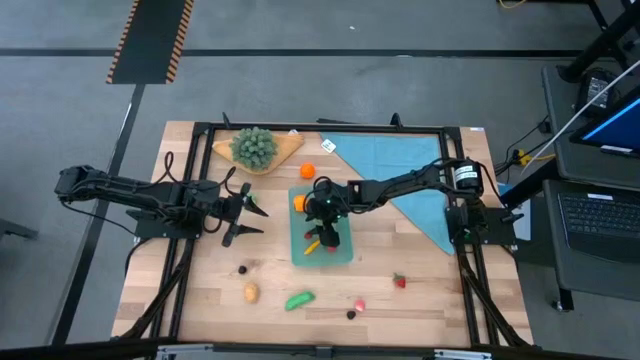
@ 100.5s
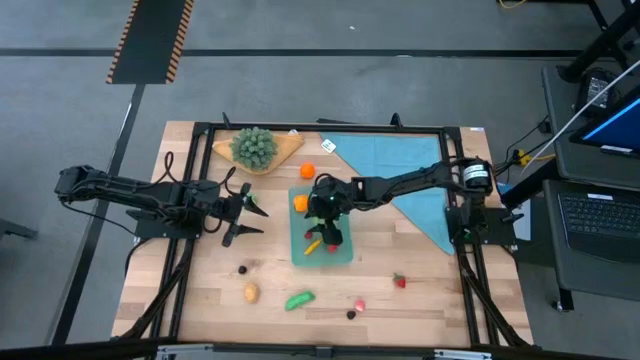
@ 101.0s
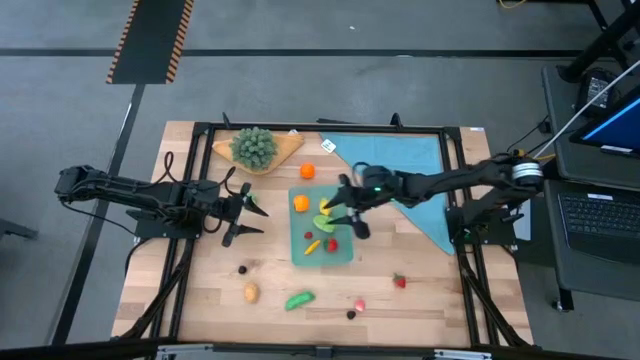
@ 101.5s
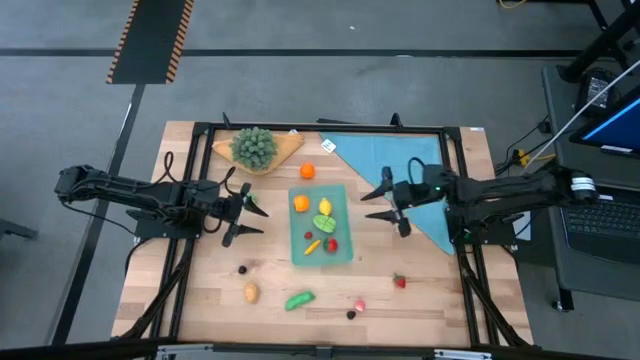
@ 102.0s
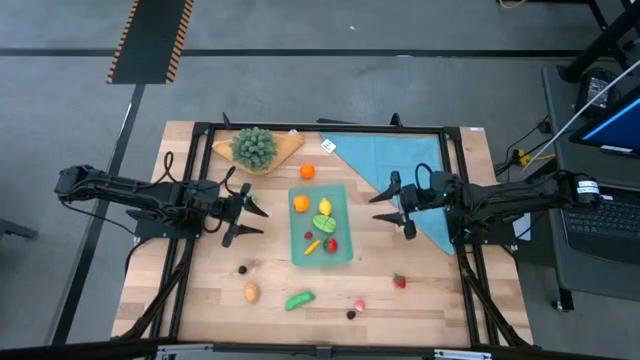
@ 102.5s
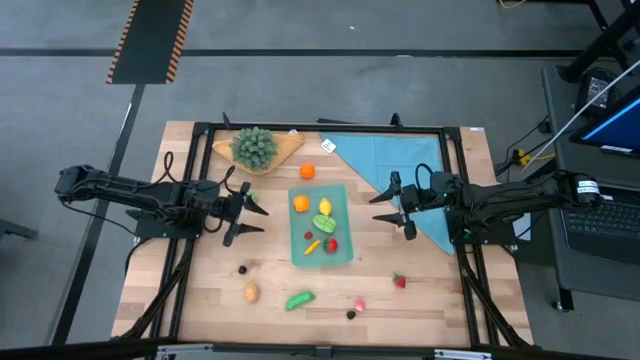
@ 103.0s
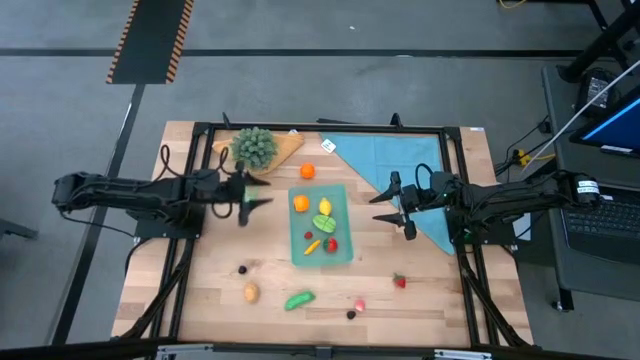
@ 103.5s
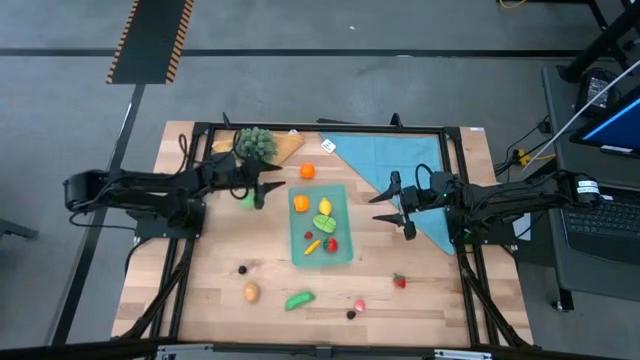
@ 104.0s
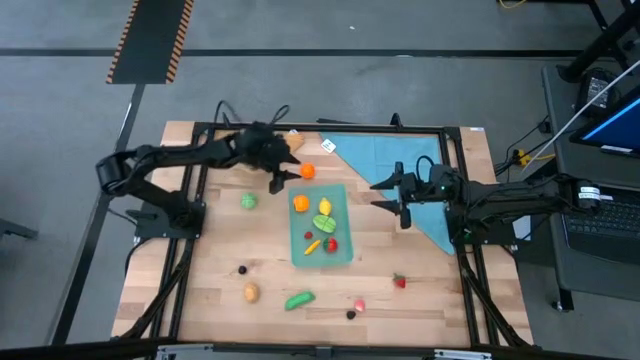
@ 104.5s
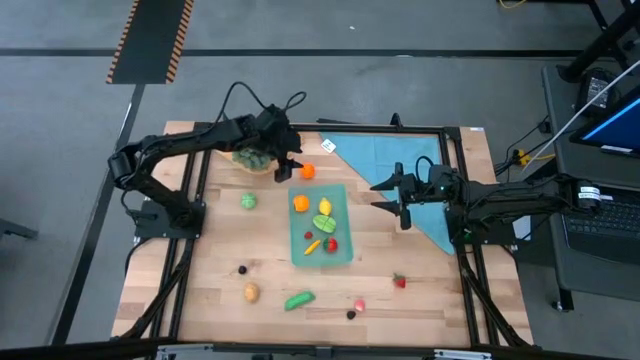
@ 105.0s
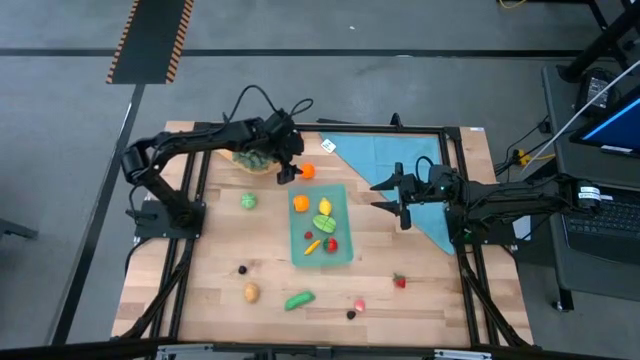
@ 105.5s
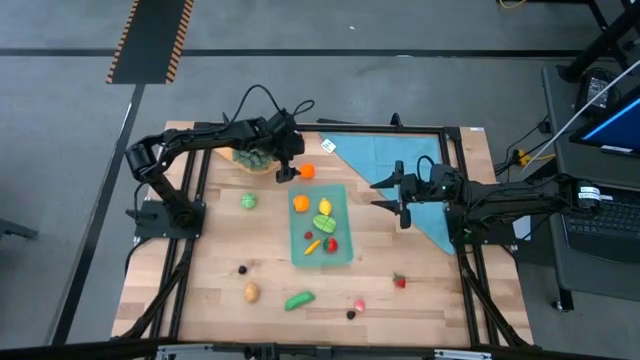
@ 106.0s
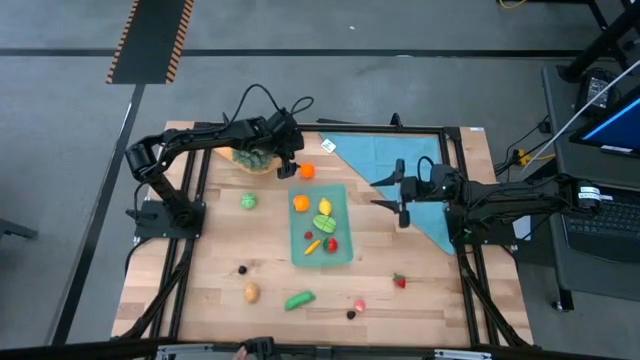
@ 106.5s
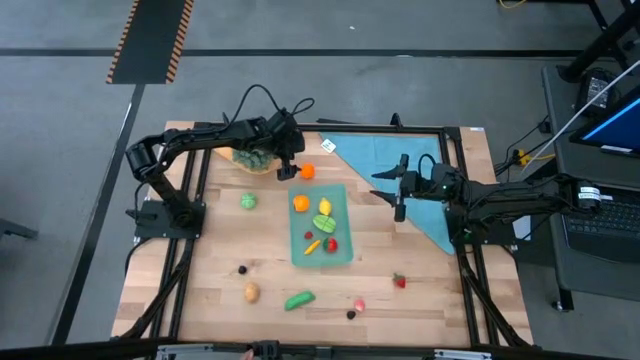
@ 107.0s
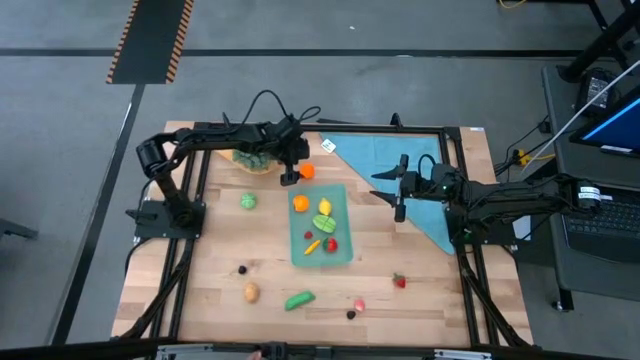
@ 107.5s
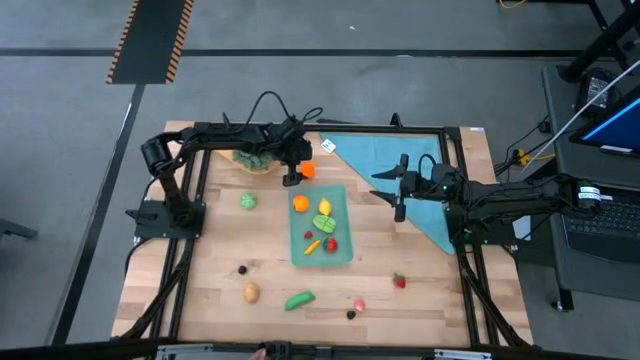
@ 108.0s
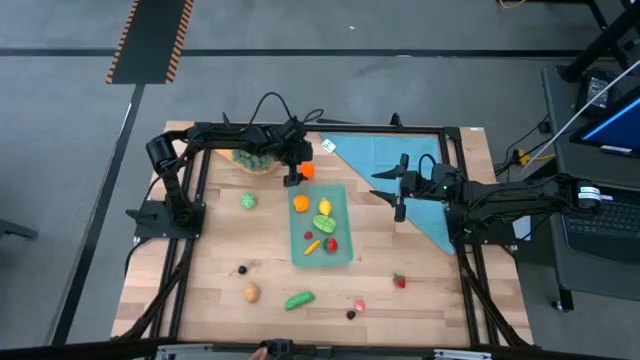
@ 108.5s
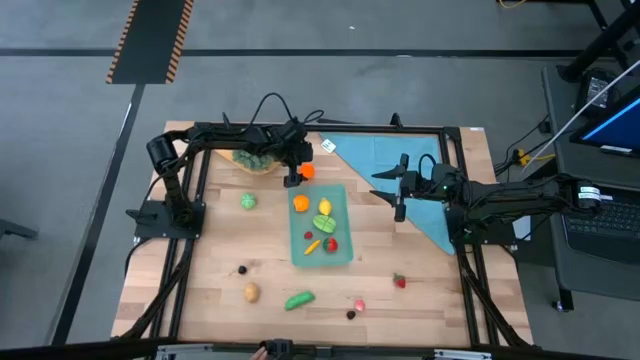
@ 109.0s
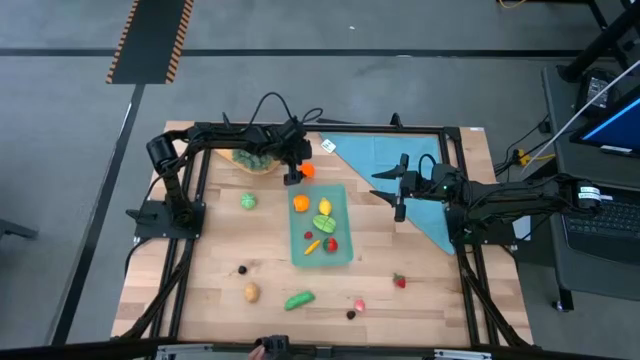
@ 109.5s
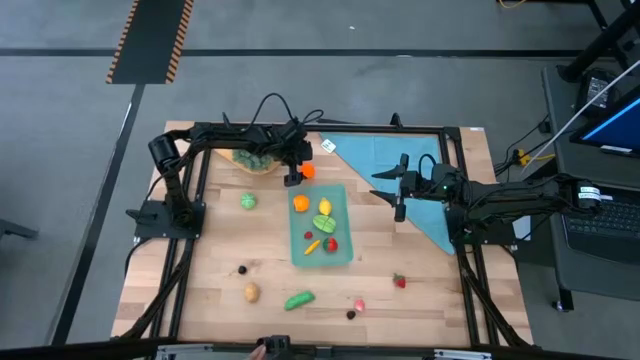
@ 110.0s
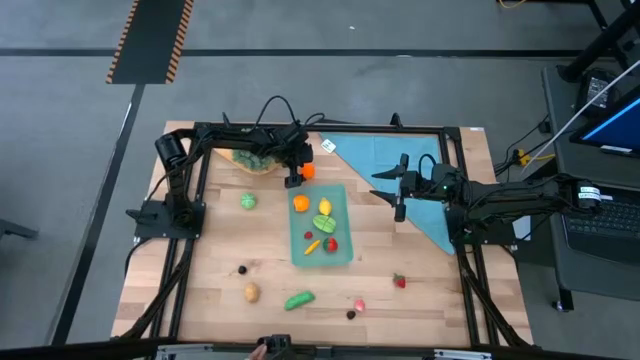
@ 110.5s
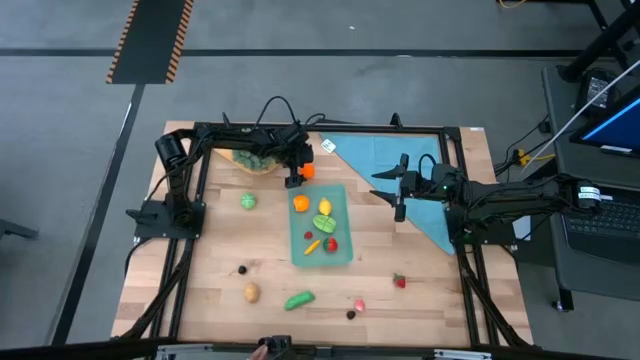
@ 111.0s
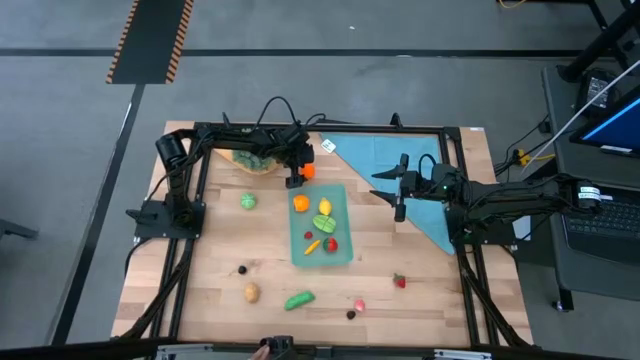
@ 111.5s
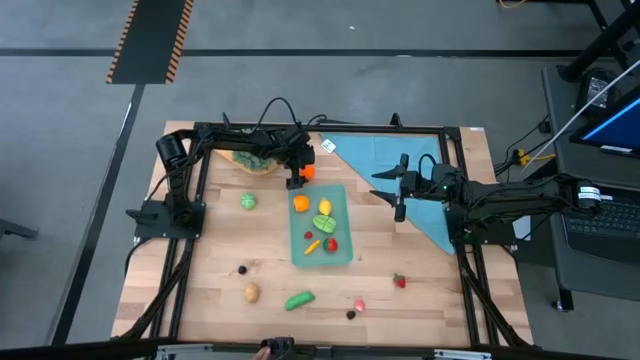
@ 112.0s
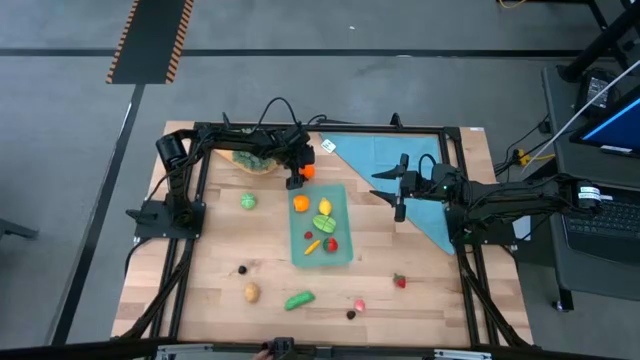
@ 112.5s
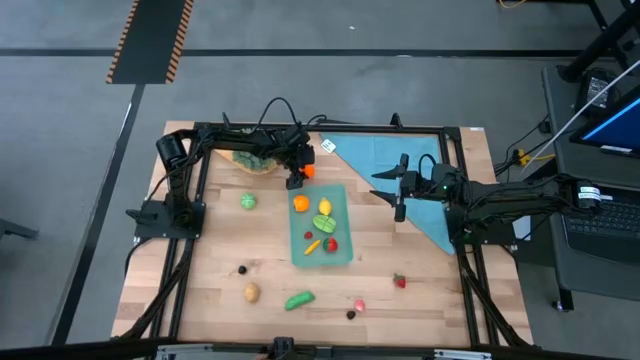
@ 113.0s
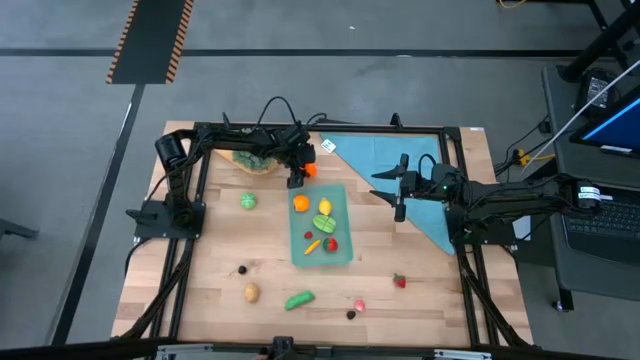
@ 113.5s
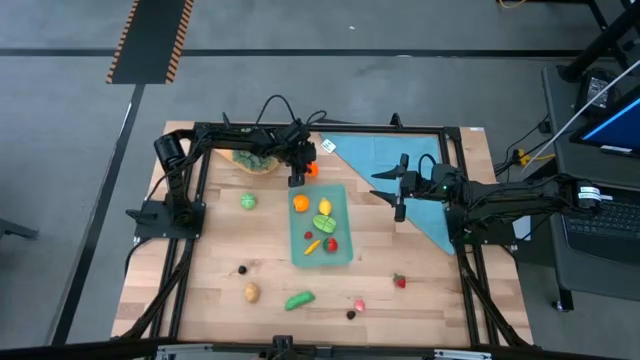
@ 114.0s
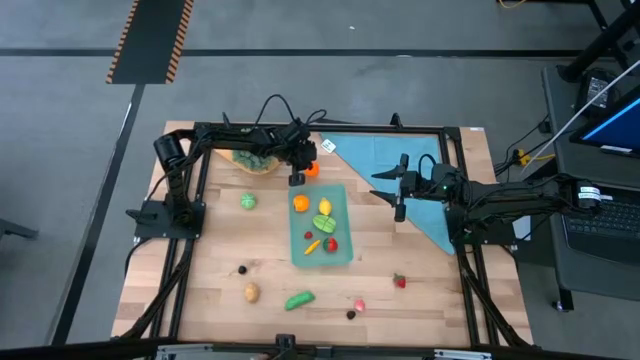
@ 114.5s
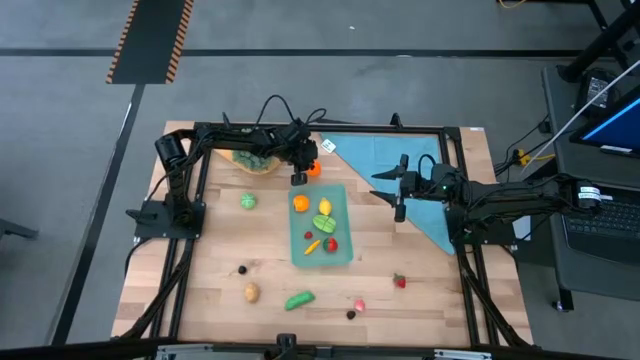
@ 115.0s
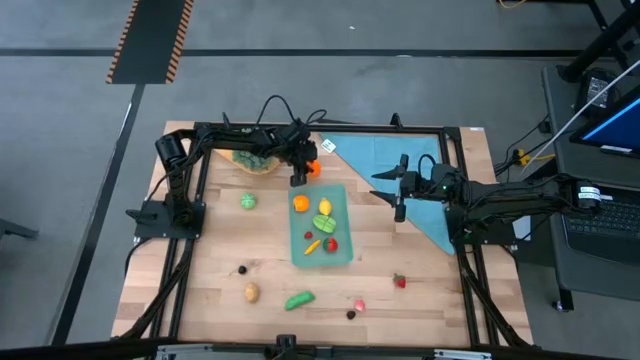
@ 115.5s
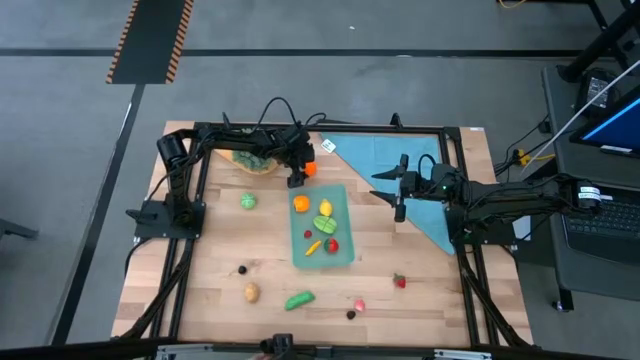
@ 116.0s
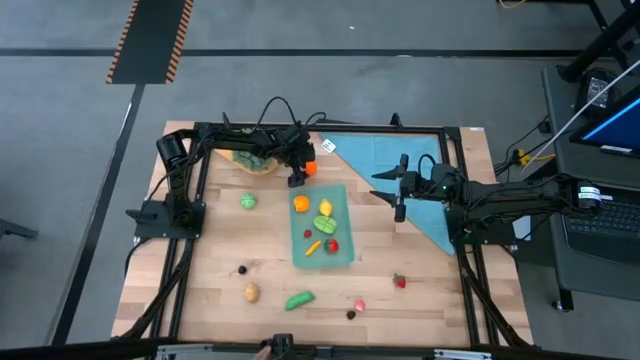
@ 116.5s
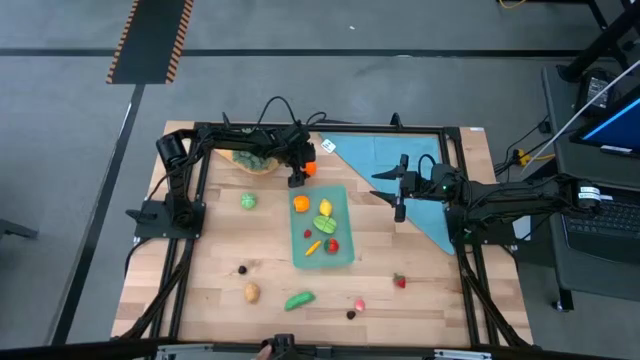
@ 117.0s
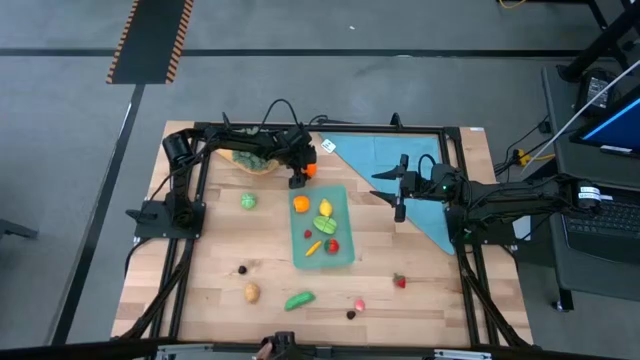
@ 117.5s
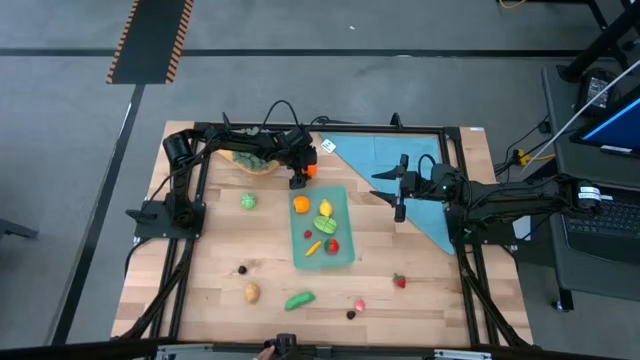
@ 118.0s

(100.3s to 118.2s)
Task: Pick and placing Produce into tupperware
Put the squash into the bin

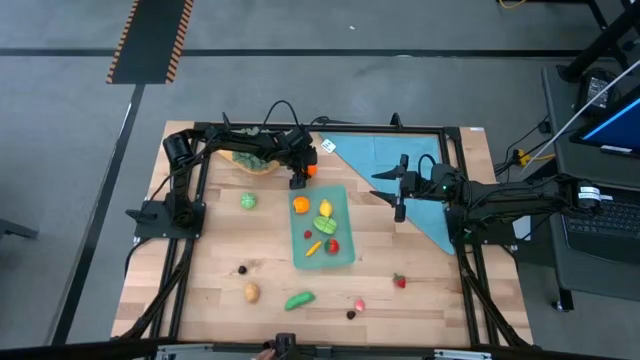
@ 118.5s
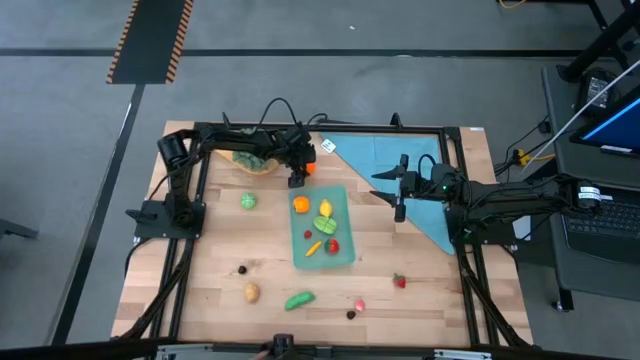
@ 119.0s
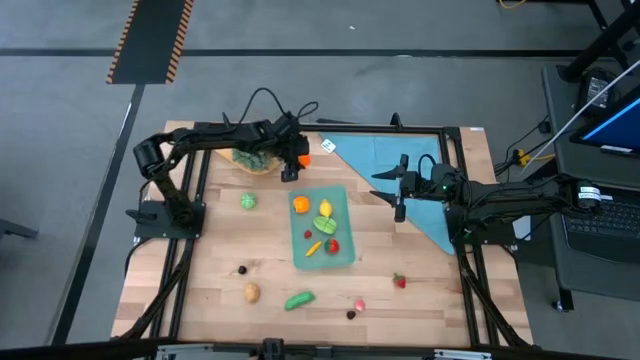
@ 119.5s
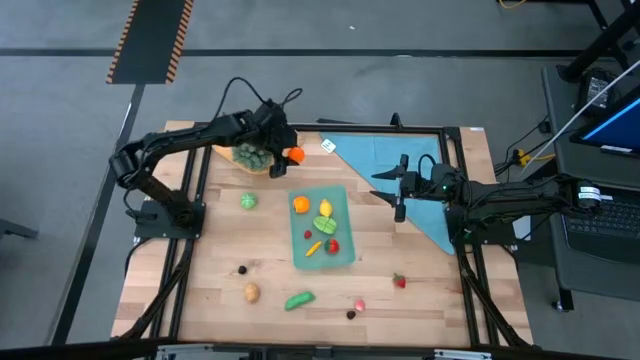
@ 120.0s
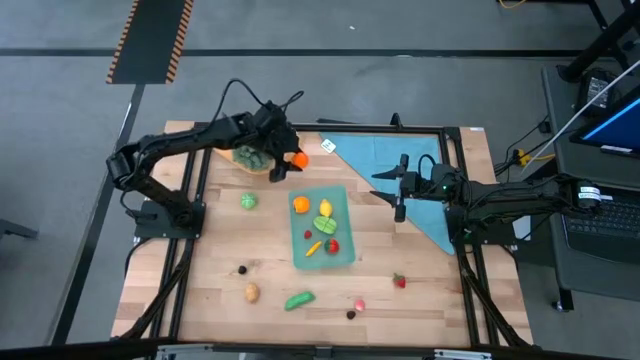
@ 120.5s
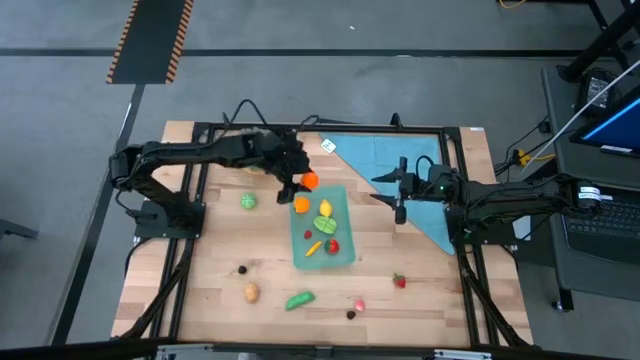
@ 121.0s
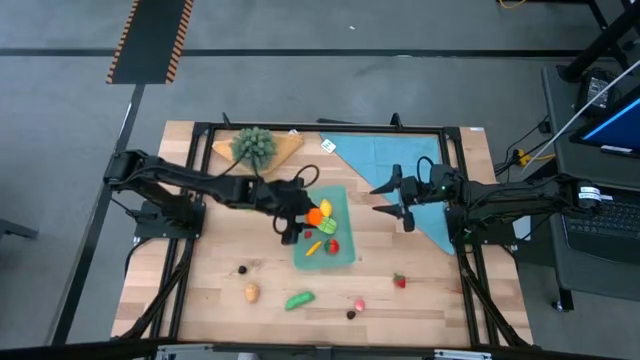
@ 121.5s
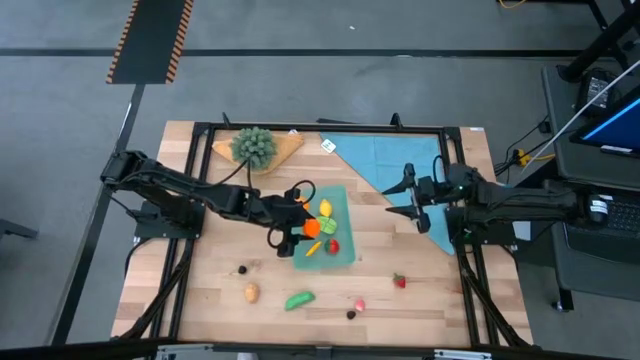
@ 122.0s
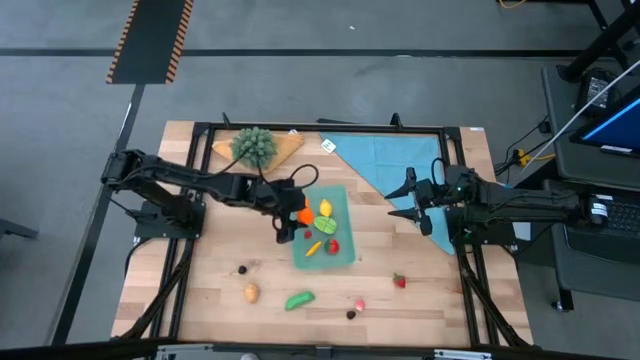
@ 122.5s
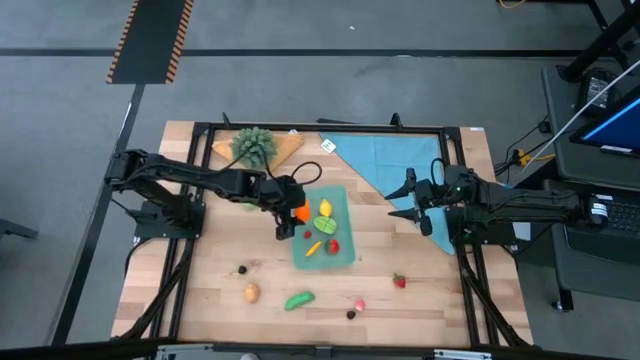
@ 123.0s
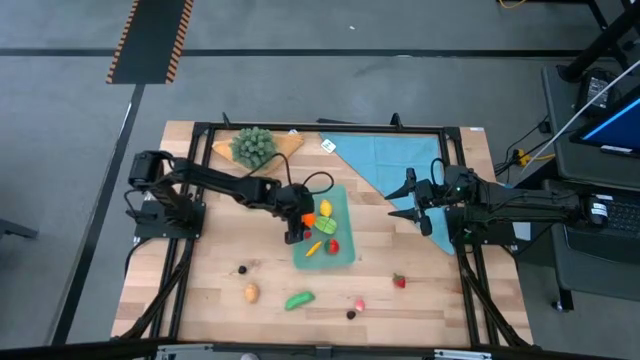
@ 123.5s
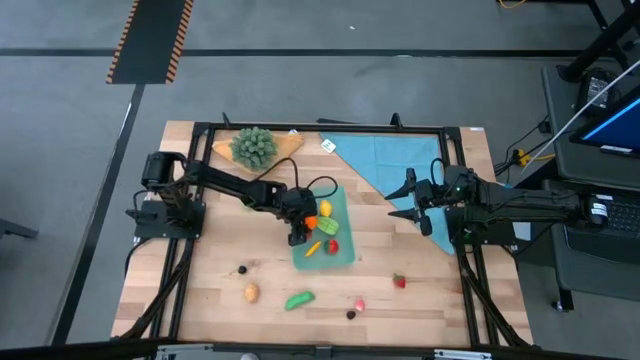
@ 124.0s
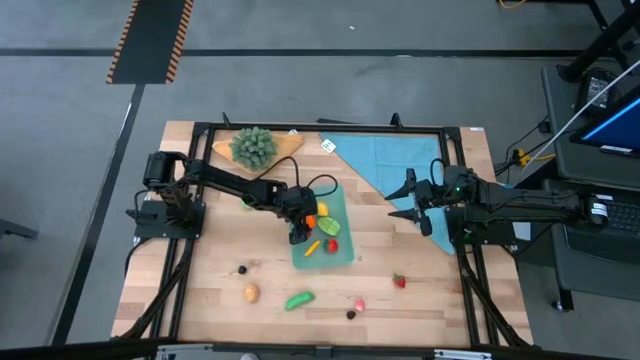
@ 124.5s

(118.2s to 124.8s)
Put the squash into the bin
